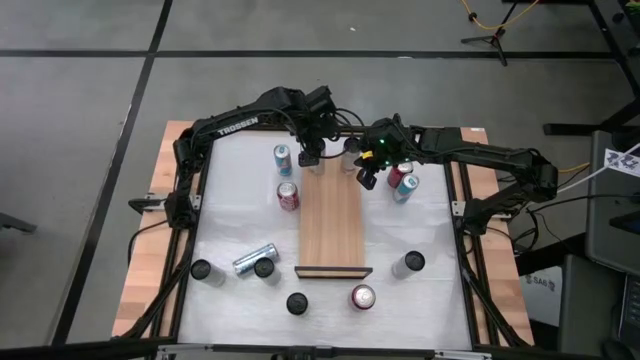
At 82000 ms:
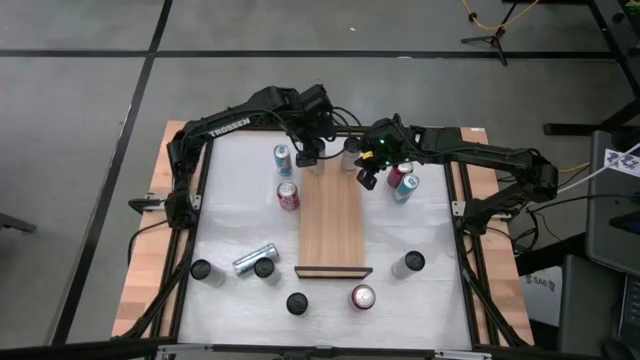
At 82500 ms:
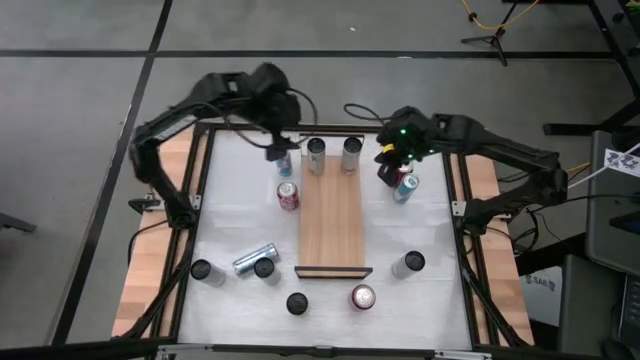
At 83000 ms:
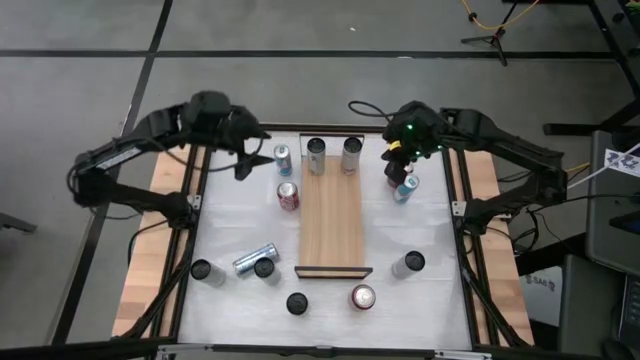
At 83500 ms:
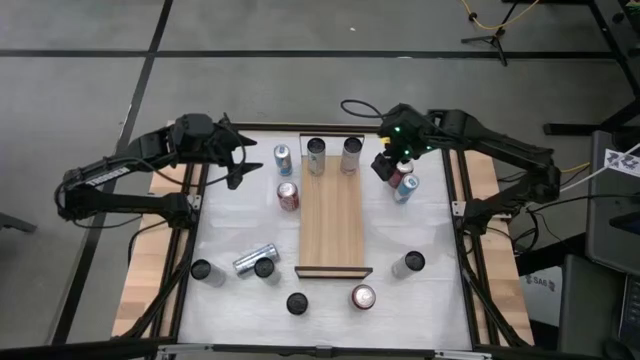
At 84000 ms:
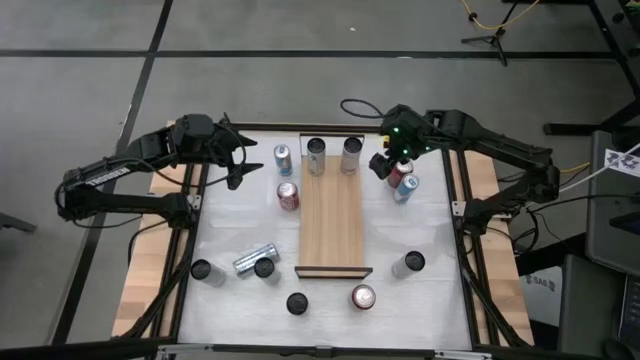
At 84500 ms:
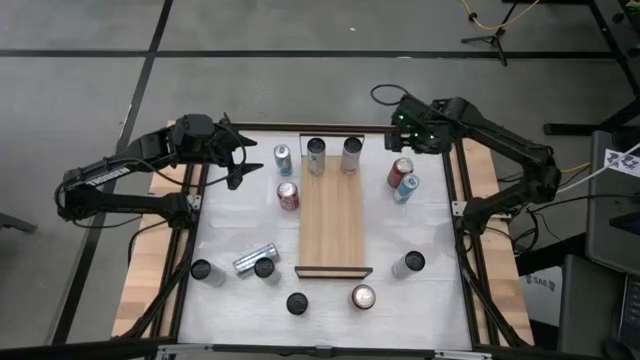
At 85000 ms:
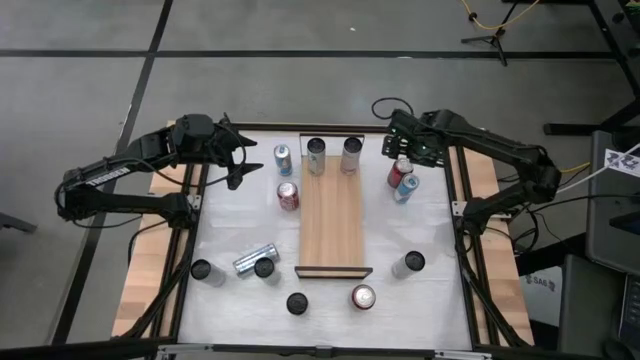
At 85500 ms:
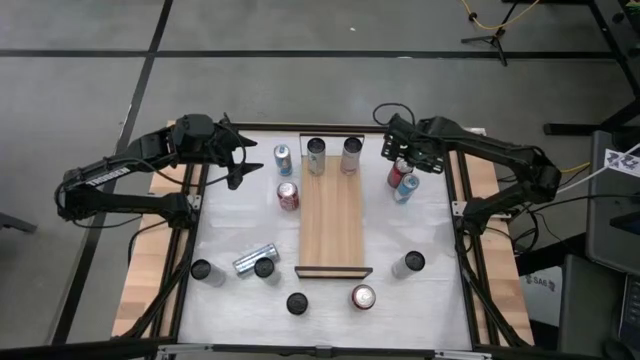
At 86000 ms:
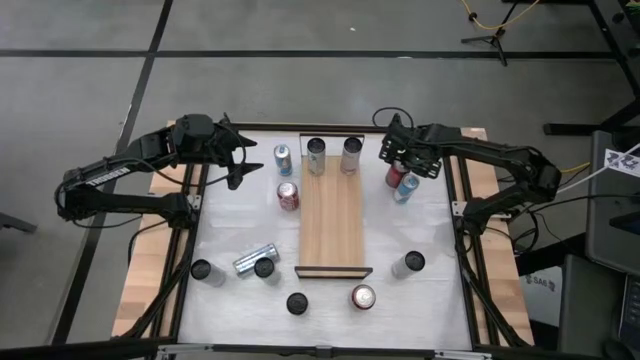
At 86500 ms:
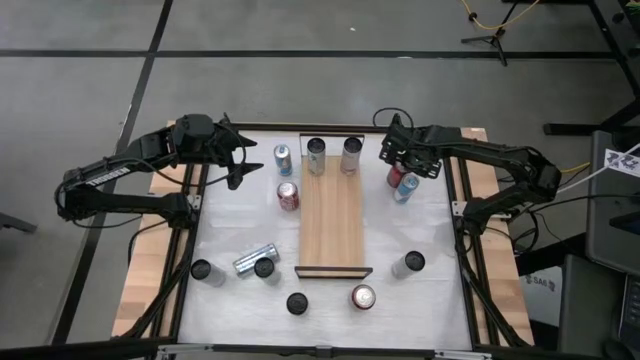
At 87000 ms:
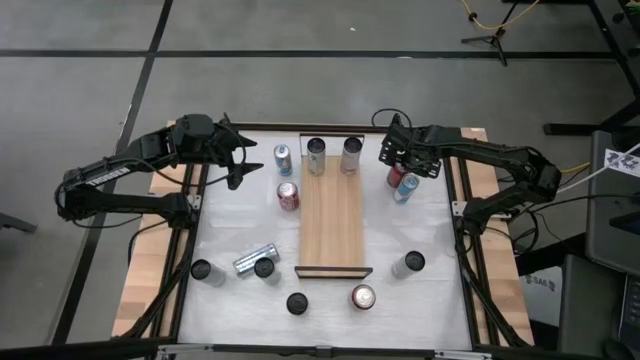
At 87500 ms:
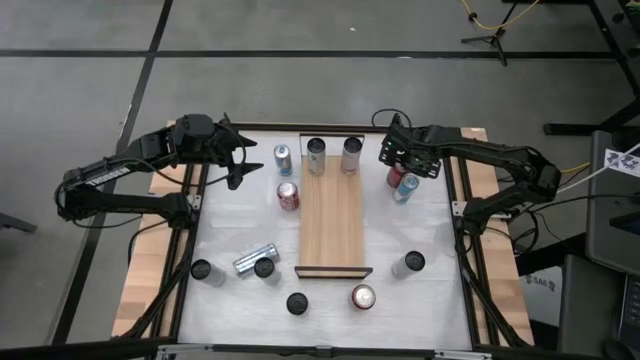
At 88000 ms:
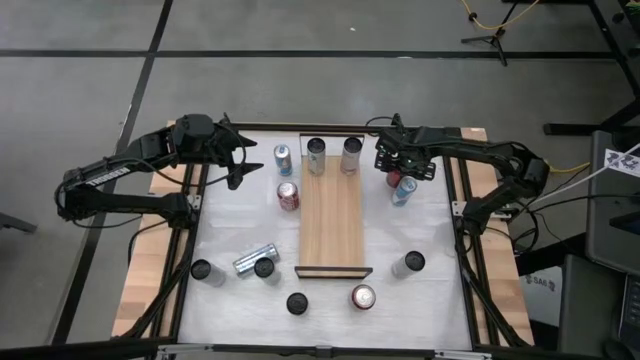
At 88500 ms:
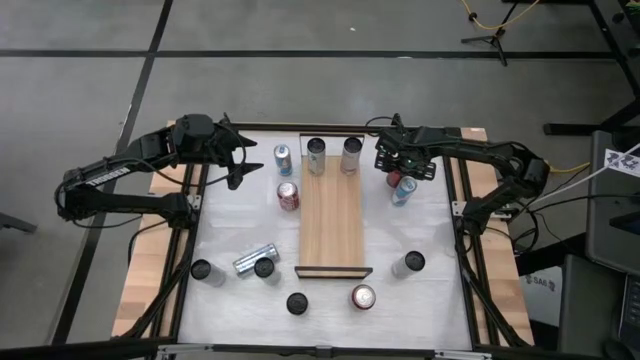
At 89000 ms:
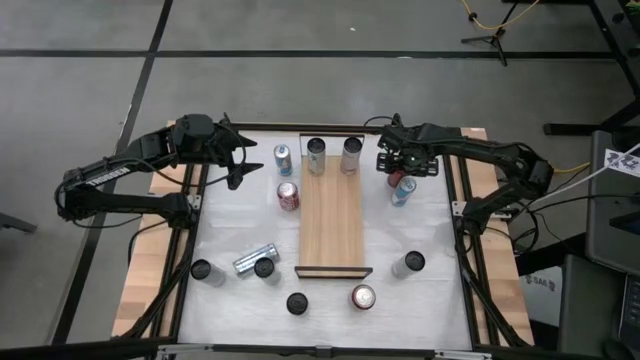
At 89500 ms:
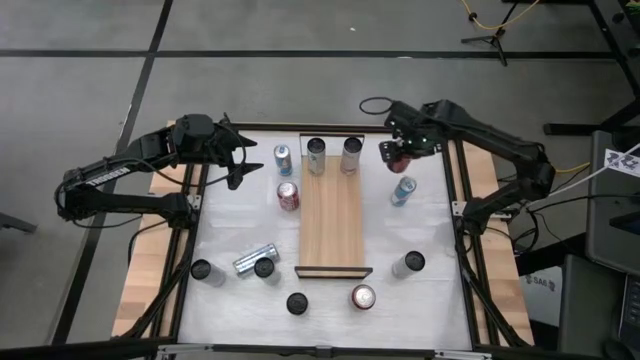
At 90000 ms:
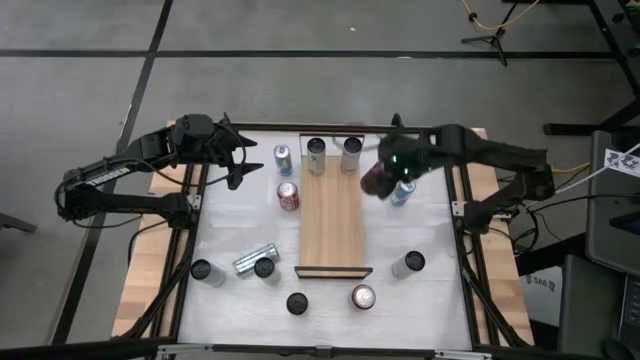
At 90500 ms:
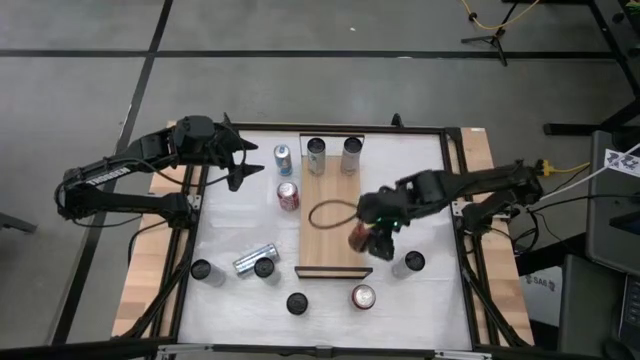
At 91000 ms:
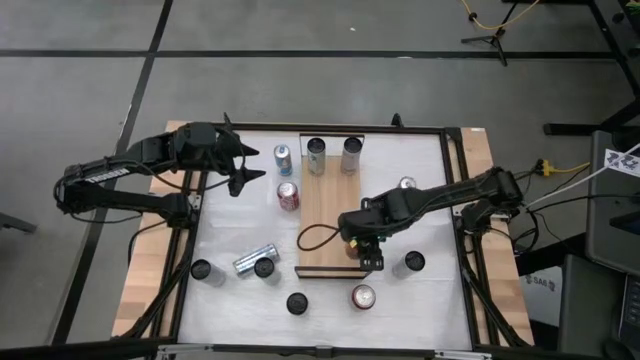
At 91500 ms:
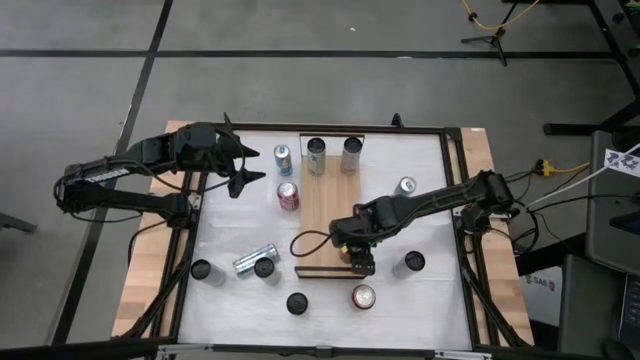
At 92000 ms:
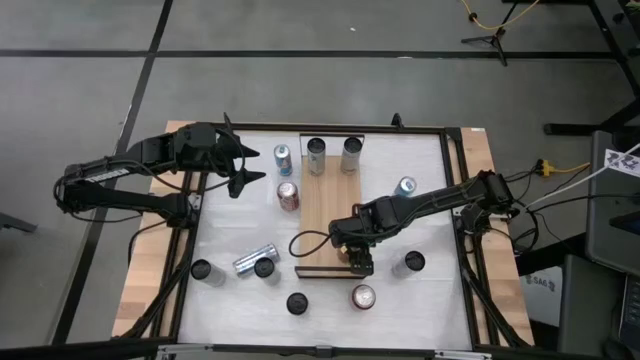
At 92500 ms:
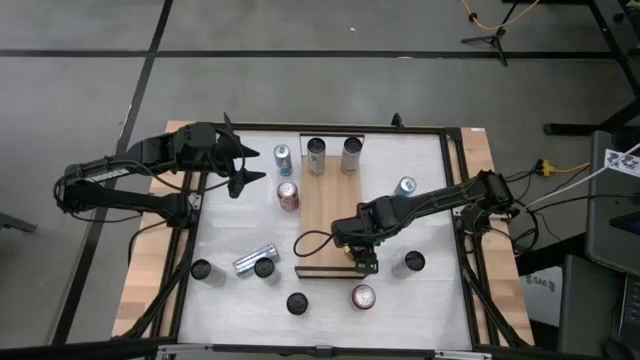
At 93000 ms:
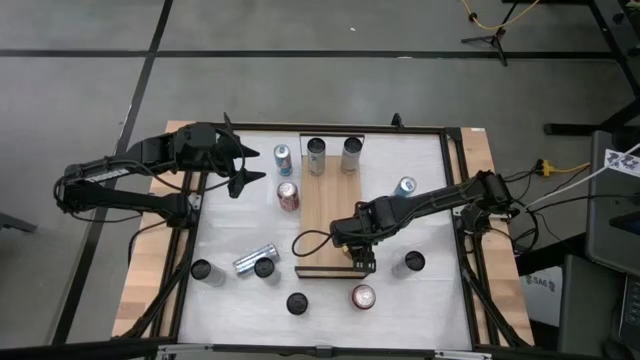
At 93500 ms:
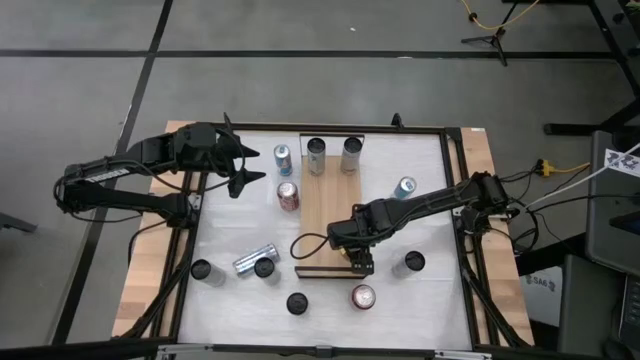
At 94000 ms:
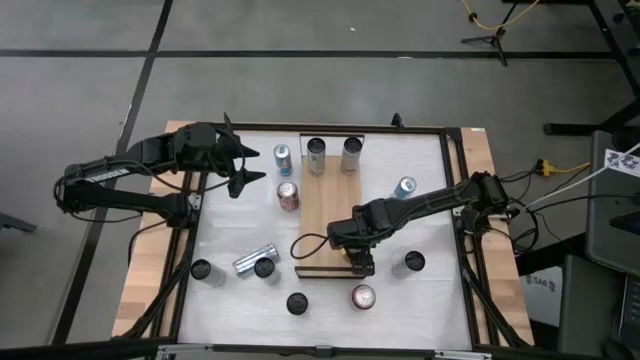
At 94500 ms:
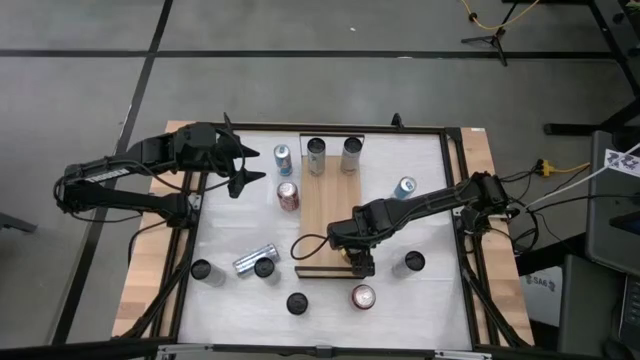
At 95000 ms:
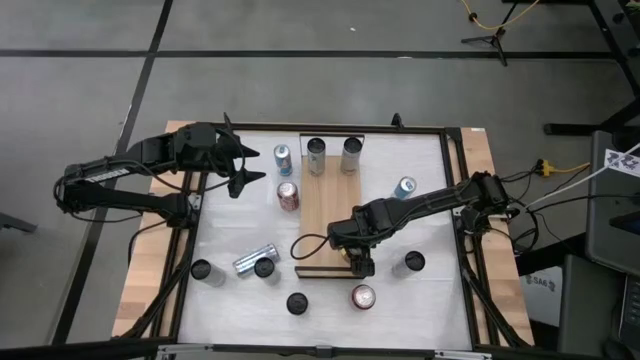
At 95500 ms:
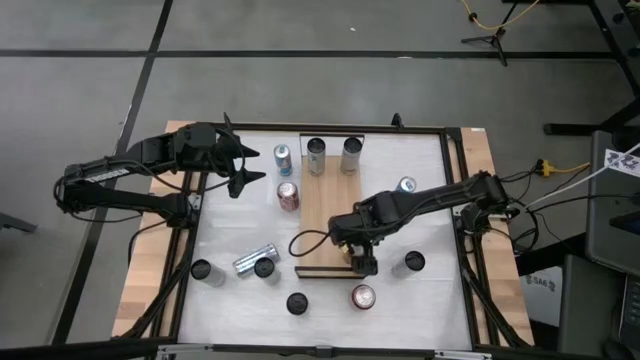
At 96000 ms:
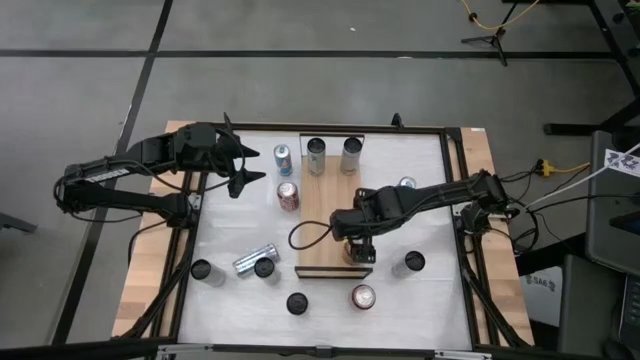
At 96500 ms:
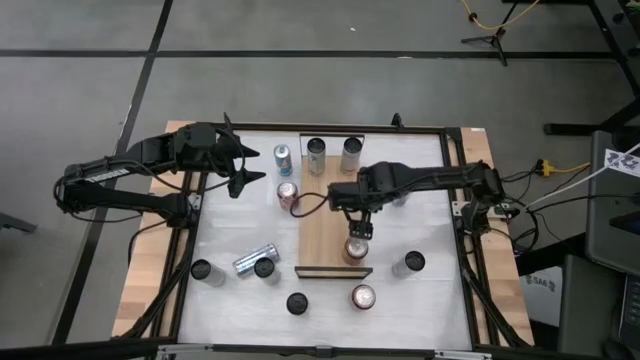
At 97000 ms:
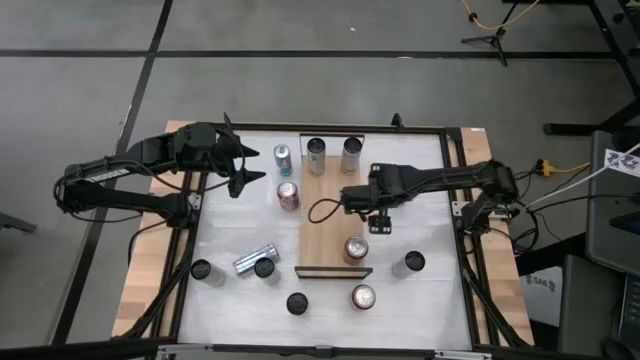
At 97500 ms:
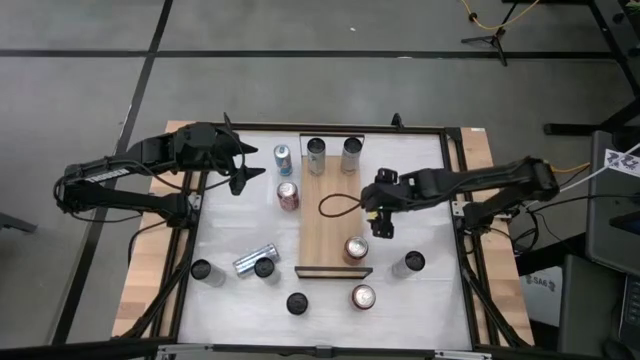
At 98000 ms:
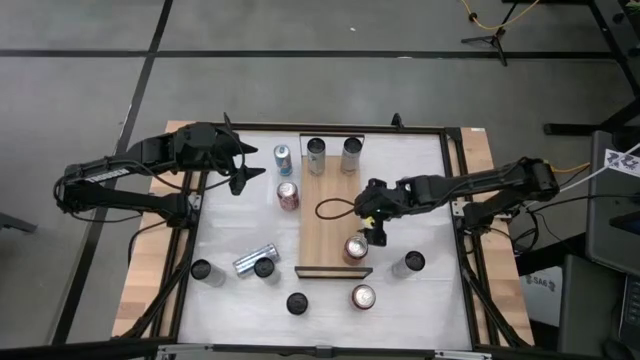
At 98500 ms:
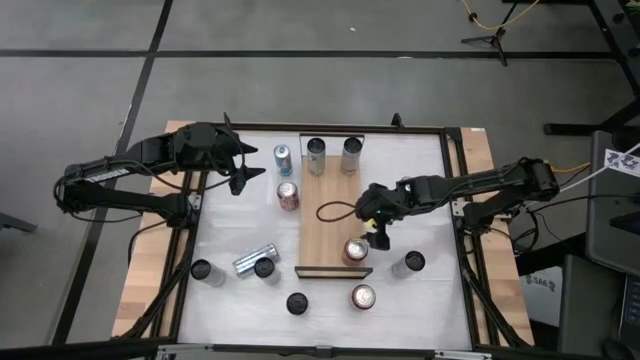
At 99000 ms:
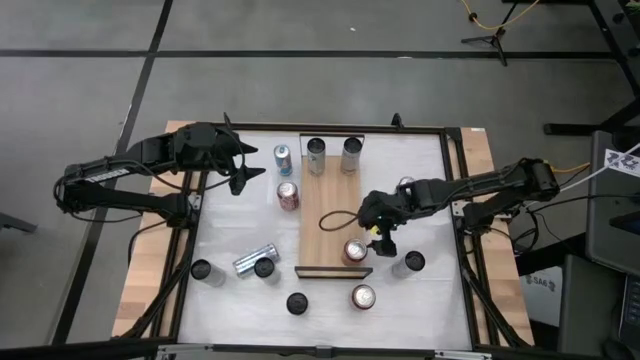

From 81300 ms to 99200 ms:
Task: Place canned beverage on shelf
Put the red black soda can on the shelf

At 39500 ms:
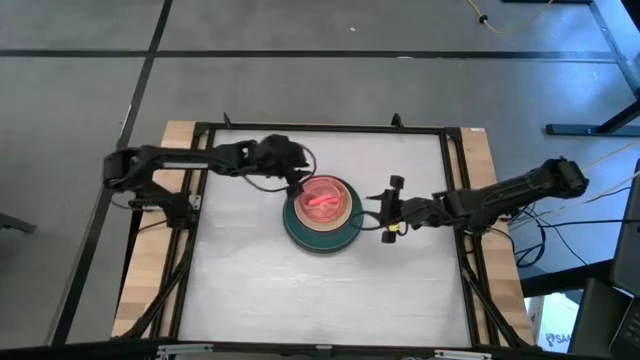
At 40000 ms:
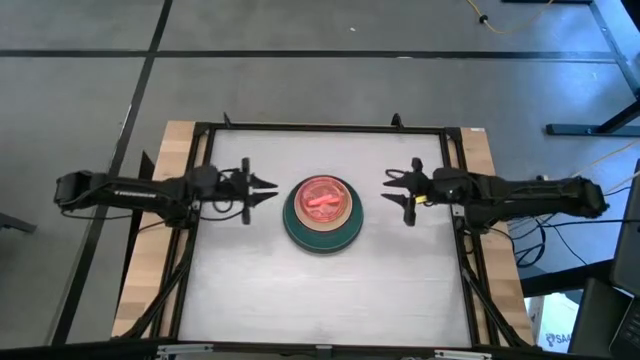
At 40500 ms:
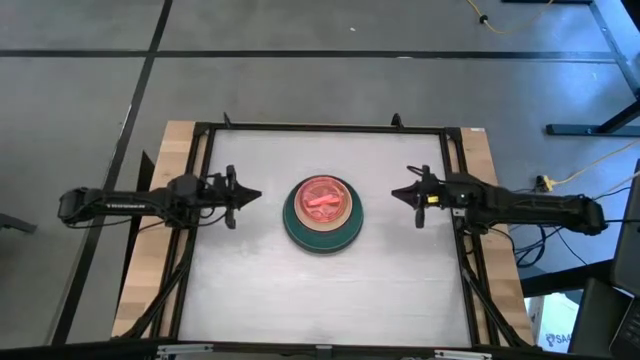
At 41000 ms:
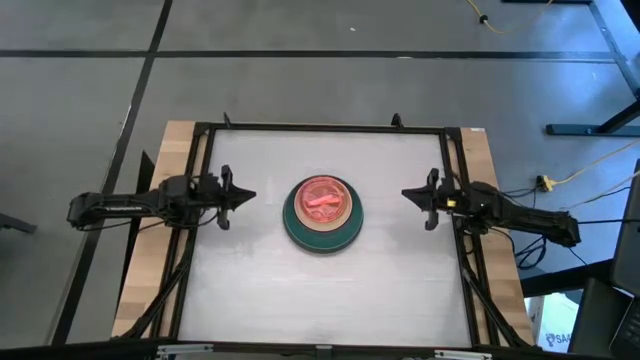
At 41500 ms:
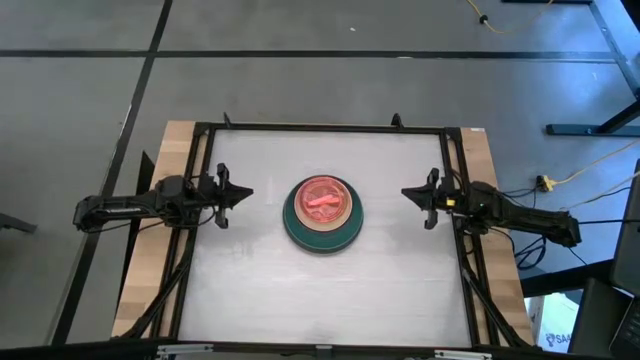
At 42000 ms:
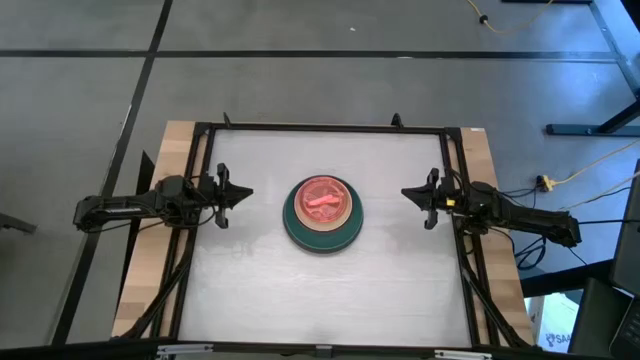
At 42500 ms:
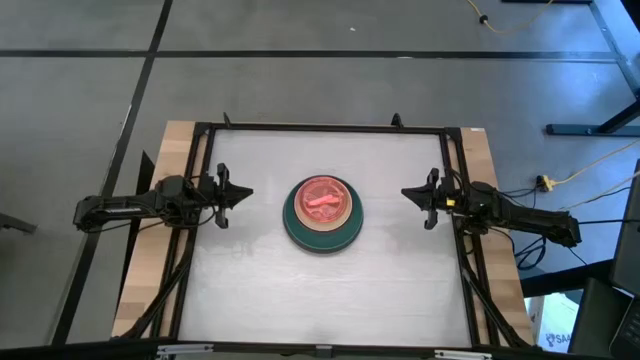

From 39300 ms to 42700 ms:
Task: Stack plastic plates
Return to Home Position
